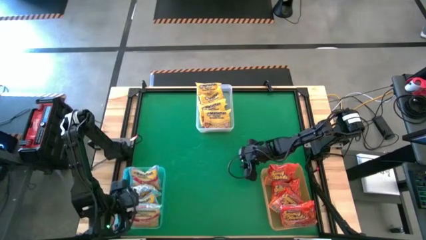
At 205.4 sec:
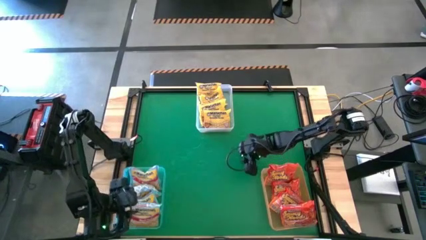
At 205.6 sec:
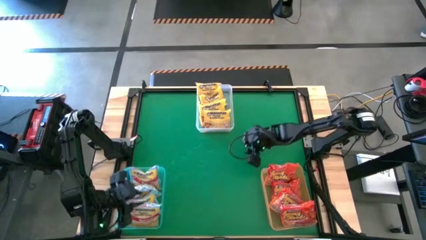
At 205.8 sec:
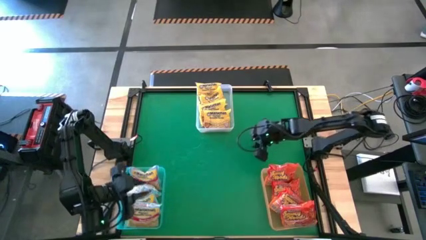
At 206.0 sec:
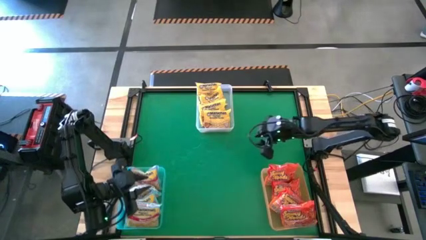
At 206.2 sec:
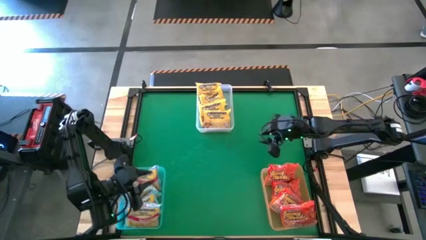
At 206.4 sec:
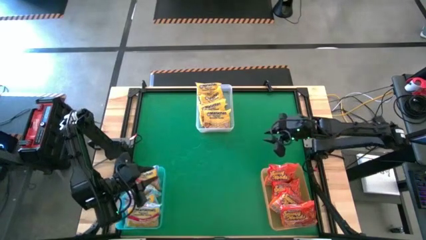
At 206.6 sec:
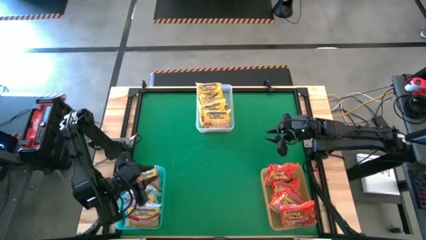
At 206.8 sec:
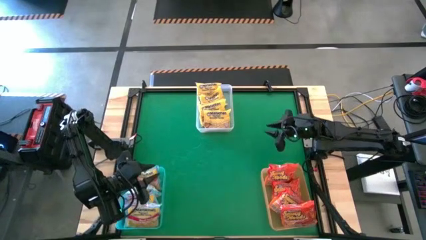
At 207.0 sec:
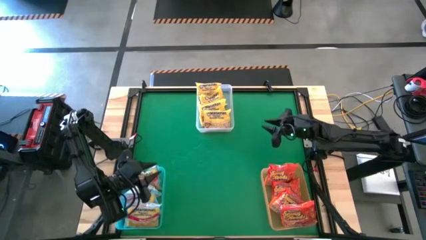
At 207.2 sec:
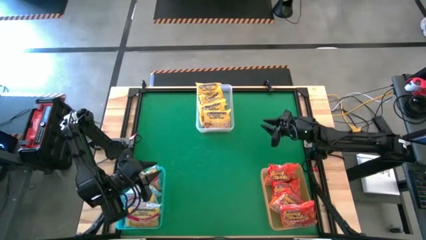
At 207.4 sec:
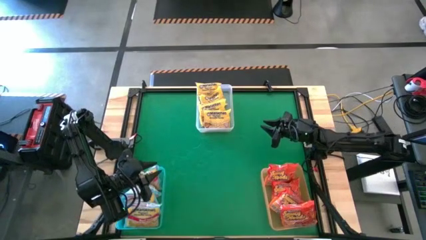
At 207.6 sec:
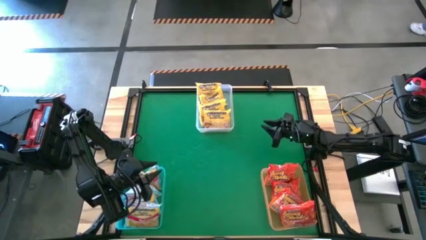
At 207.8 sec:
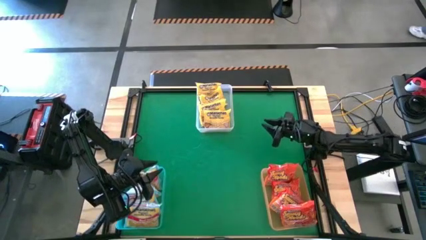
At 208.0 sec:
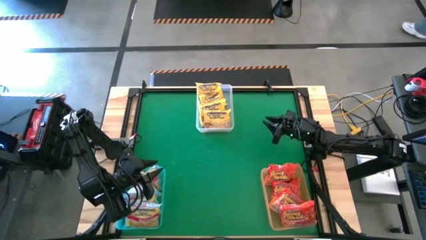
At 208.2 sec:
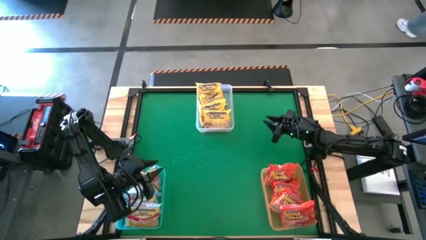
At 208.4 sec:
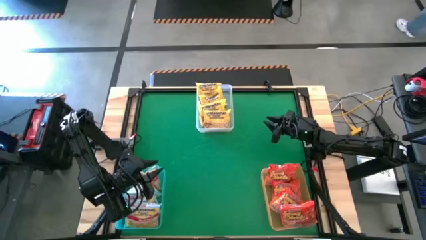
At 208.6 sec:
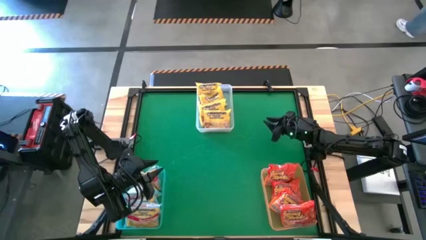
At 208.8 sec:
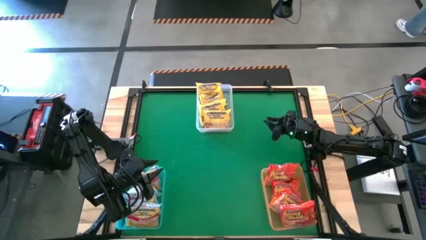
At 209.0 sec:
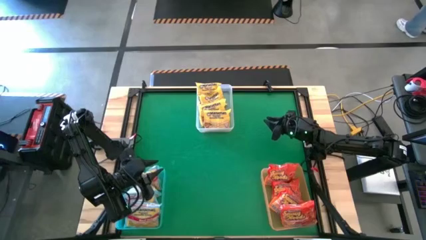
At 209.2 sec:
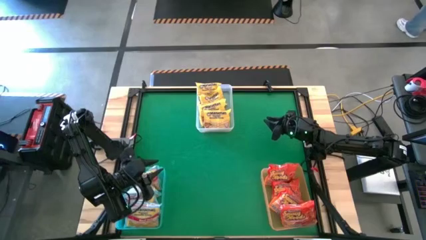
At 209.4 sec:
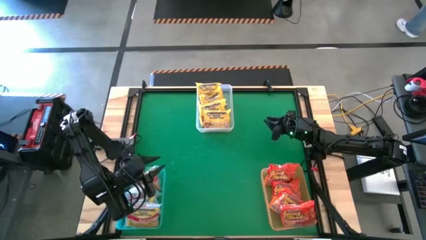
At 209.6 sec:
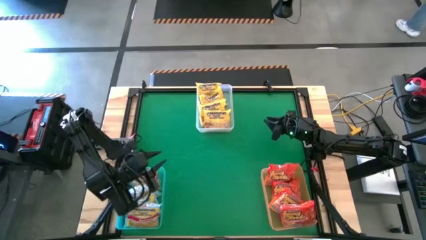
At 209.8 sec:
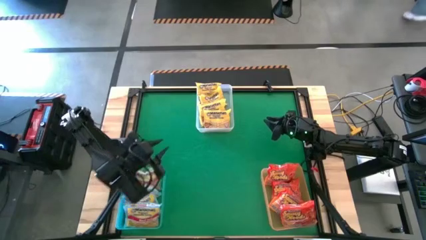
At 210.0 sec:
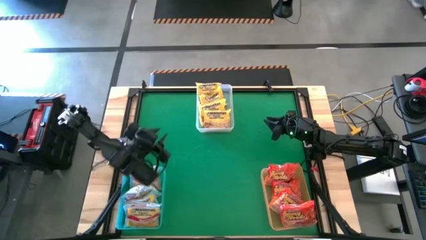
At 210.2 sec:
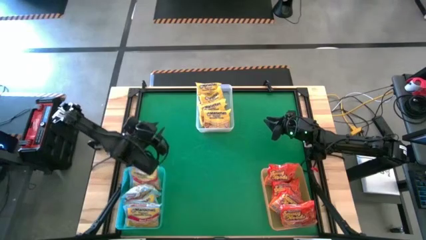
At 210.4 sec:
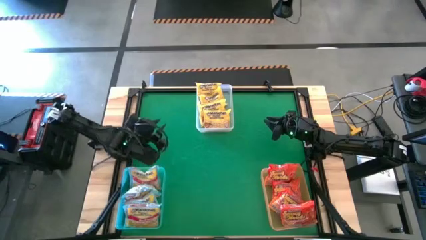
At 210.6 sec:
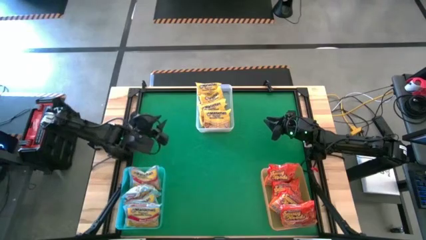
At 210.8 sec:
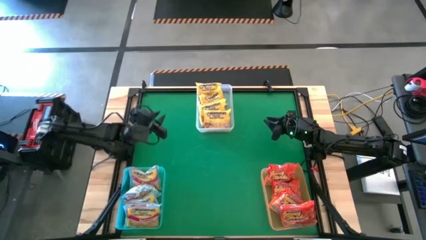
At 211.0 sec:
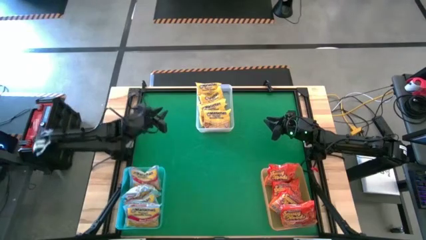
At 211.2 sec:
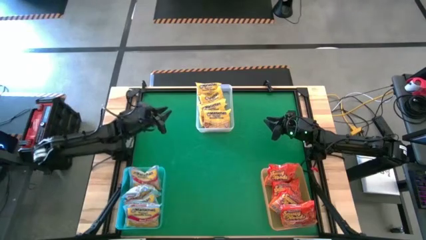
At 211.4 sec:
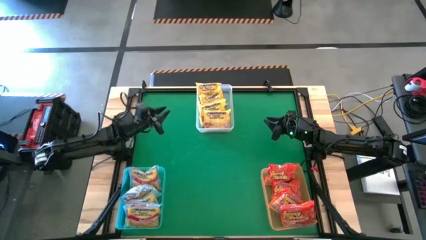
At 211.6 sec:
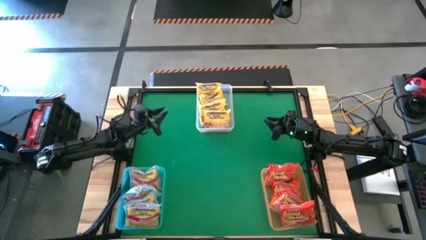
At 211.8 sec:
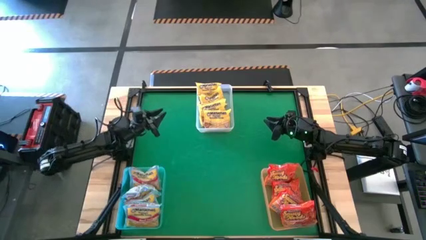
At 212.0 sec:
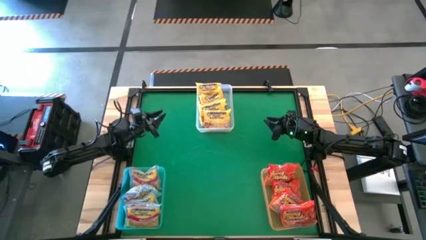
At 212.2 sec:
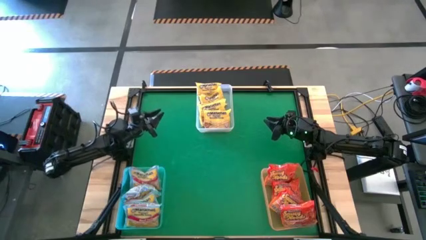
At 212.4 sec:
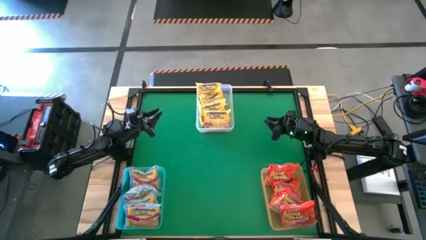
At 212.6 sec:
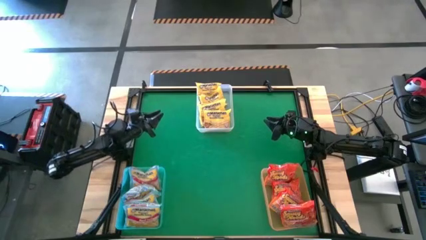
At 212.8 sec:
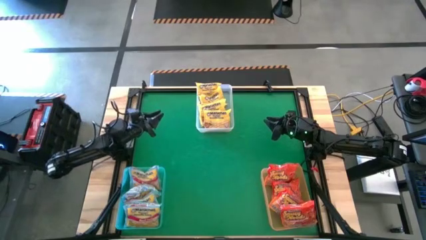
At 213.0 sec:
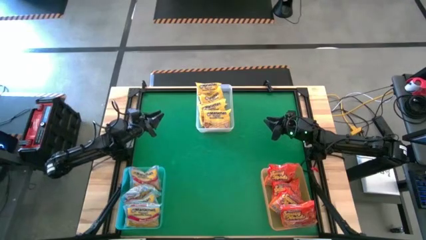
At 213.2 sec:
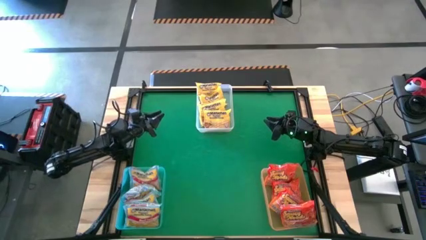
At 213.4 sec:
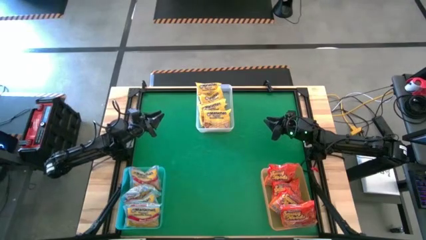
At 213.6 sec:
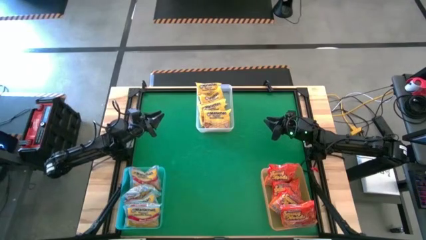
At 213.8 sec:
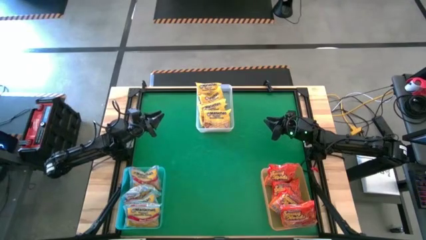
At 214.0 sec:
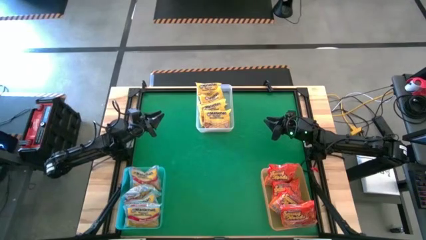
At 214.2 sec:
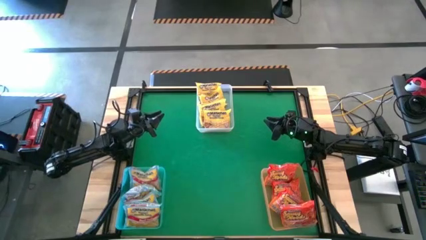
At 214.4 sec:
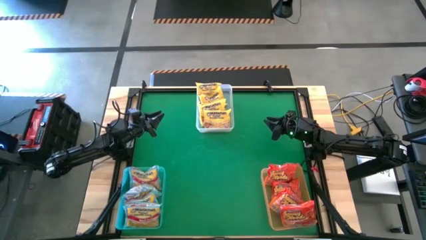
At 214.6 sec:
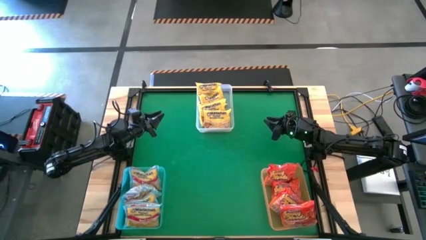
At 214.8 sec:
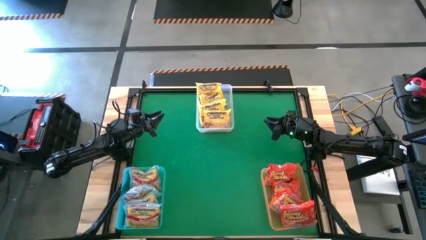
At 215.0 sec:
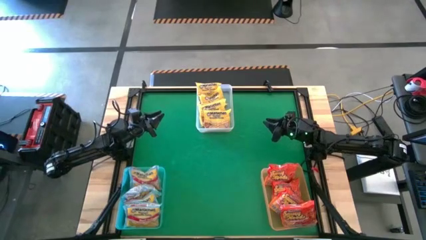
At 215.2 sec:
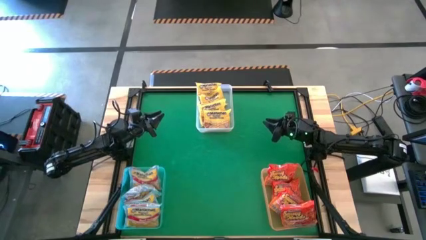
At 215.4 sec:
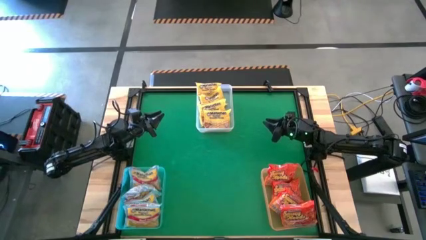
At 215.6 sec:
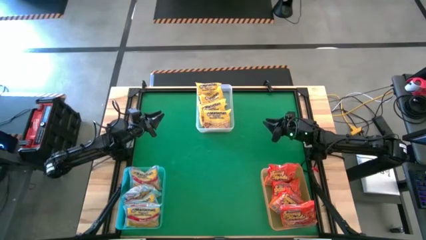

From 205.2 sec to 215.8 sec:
Task: Sort Maruchan noodles
Return to Home Position

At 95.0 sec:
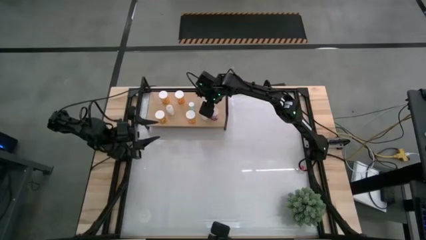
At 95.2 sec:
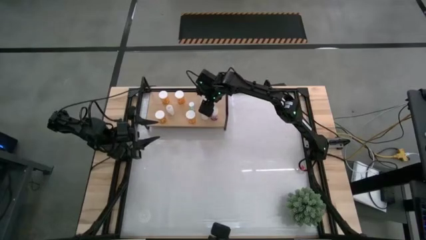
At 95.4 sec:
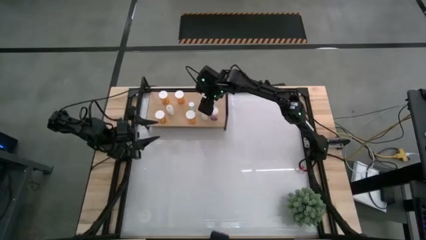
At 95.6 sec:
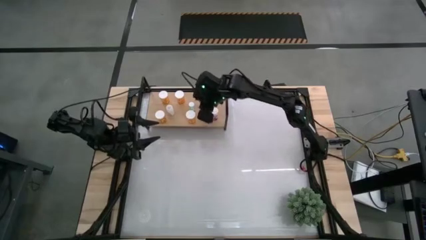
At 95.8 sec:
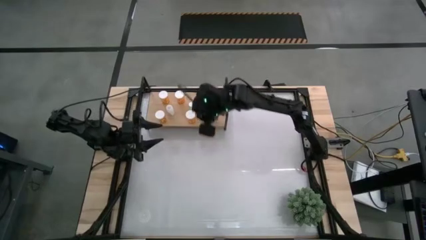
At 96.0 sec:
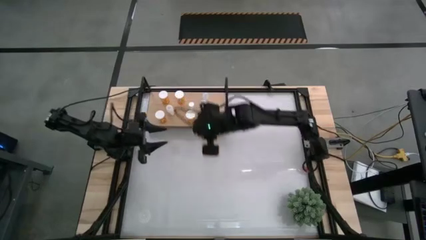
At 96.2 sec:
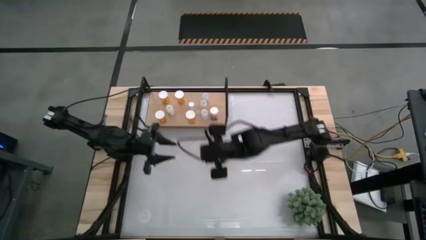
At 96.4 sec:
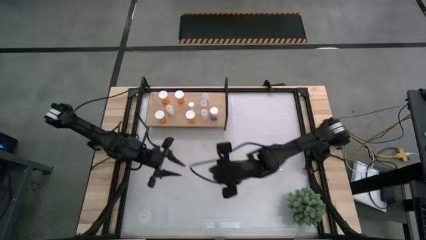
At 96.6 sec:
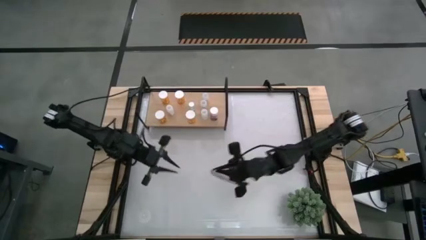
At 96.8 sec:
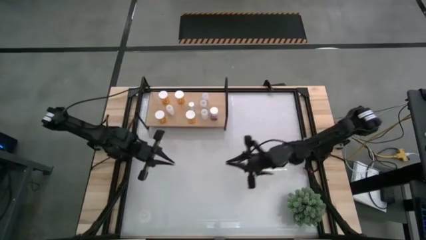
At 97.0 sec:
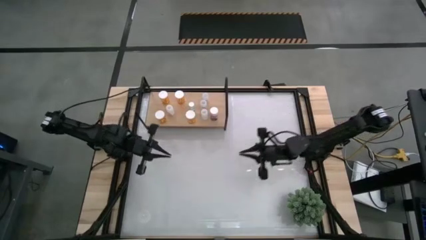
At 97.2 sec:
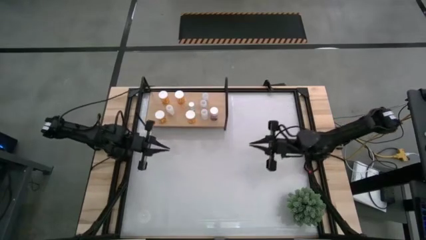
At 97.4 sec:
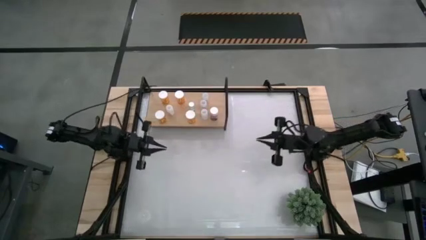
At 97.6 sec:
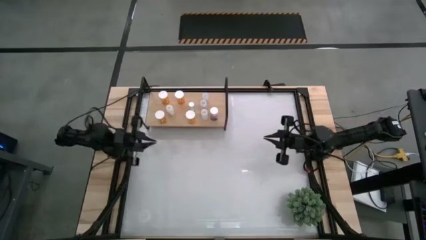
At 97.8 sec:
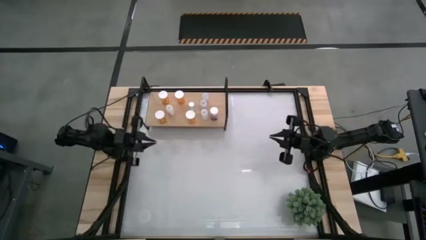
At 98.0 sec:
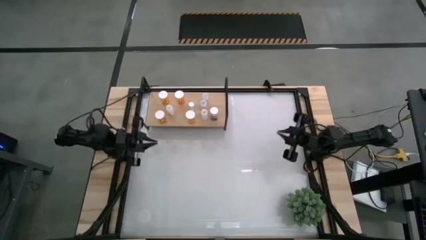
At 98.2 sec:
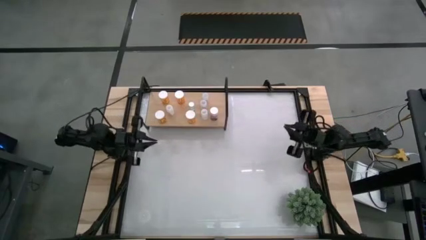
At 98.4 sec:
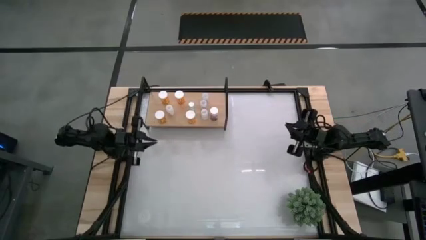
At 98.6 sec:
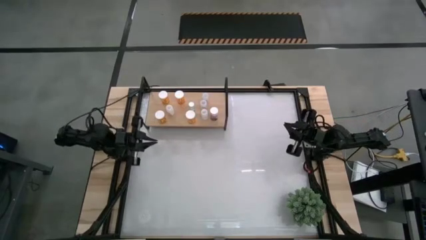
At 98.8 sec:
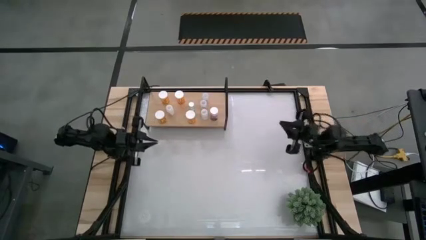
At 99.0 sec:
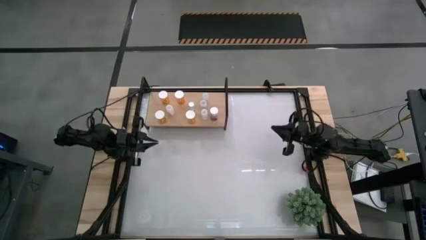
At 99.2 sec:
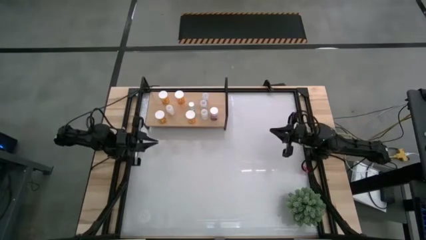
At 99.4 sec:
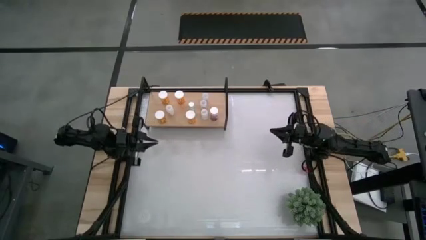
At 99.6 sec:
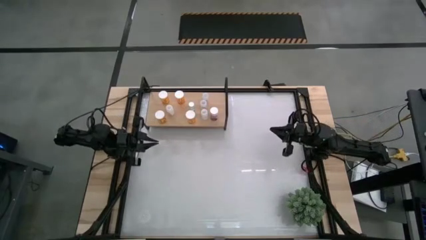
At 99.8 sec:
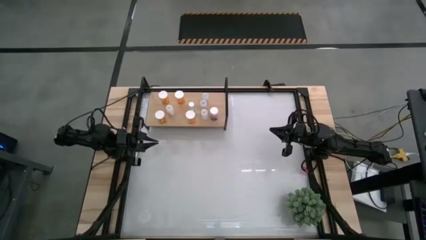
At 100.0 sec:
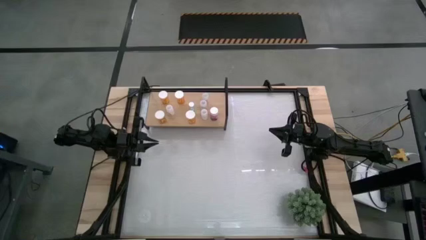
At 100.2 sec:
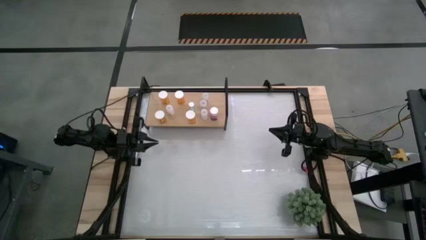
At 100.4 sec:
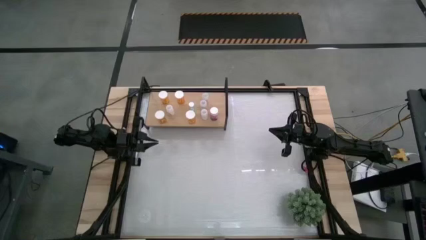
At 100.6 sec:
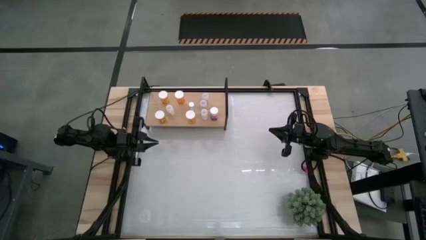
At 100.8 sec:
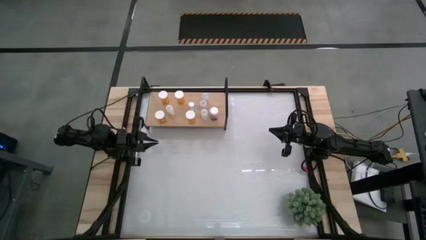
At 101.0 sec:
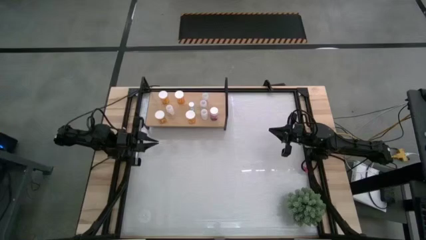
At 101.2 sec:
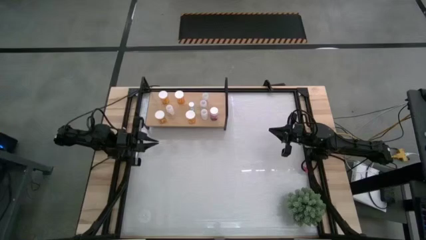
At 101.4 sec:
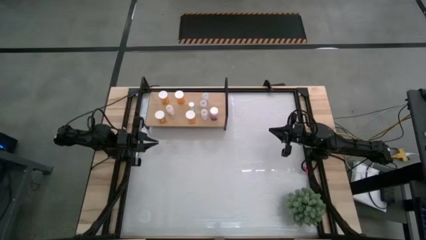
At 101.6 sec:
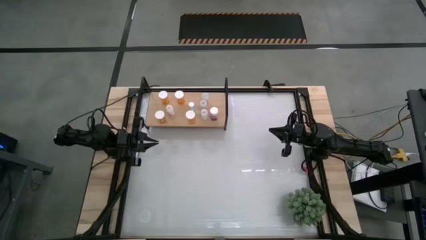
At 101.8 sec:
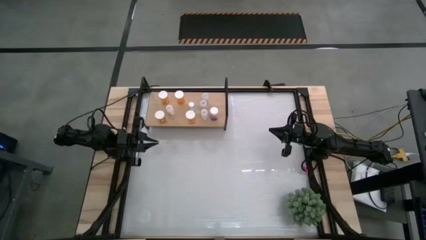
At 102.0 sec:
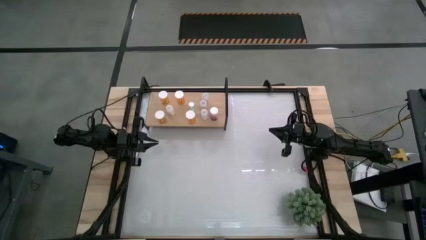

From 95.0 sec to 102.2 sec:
Task: Pick and place medicine bottles onto shelf by color
Return to Home Position
